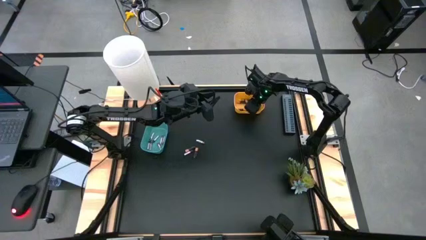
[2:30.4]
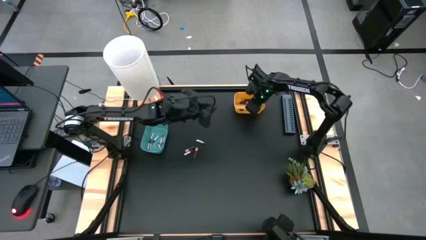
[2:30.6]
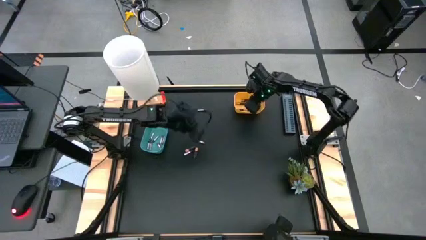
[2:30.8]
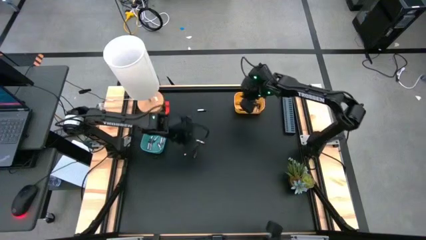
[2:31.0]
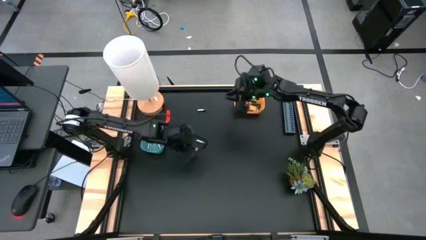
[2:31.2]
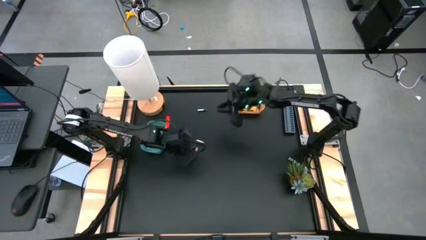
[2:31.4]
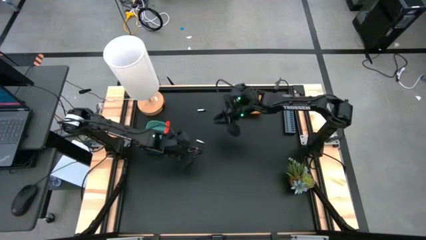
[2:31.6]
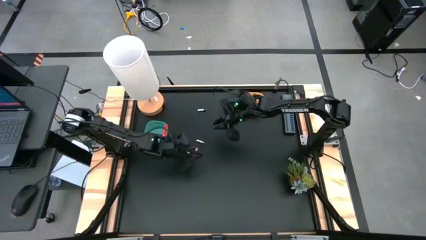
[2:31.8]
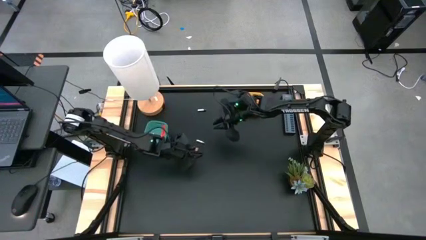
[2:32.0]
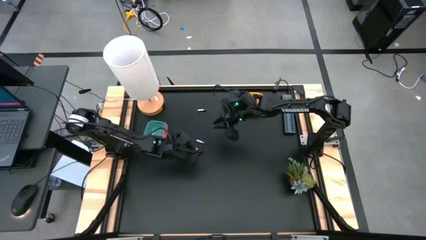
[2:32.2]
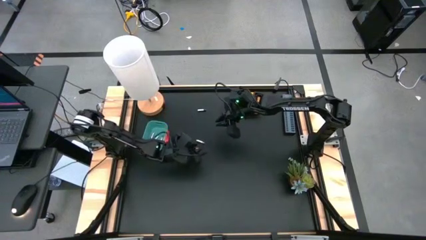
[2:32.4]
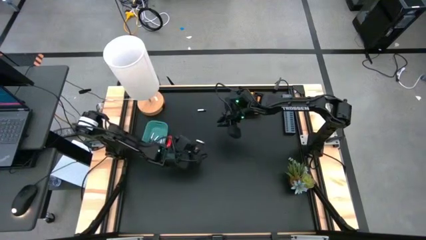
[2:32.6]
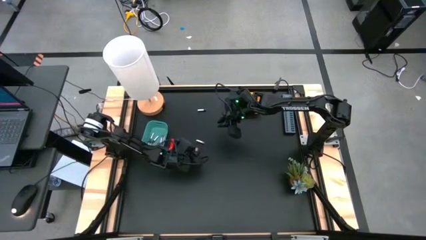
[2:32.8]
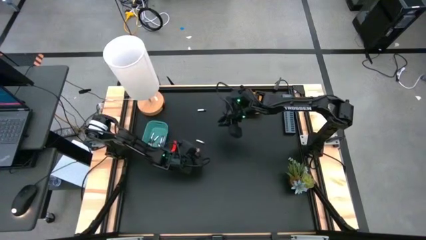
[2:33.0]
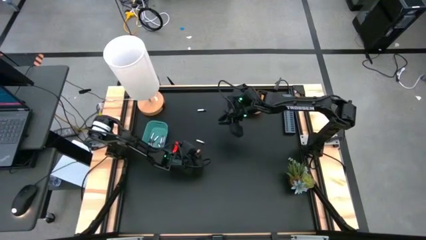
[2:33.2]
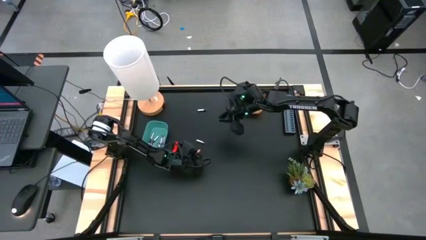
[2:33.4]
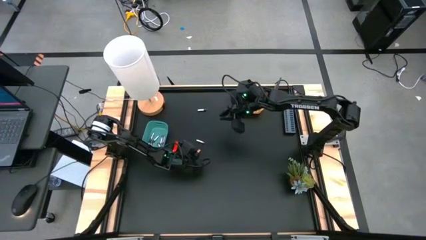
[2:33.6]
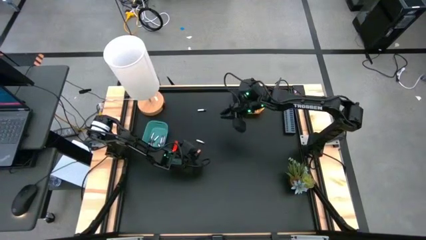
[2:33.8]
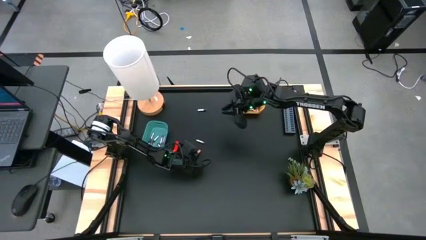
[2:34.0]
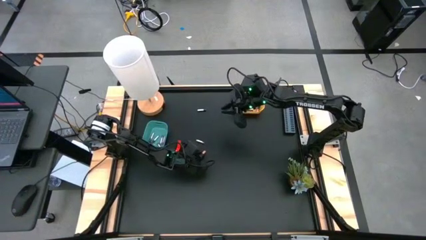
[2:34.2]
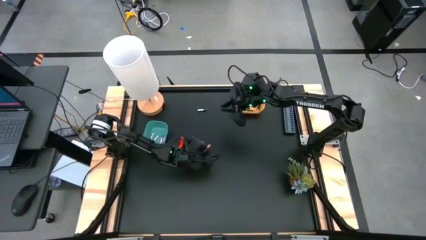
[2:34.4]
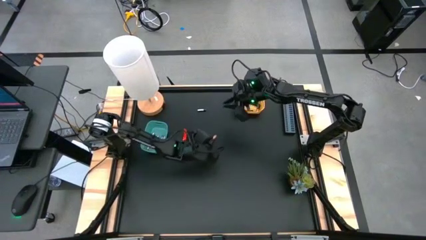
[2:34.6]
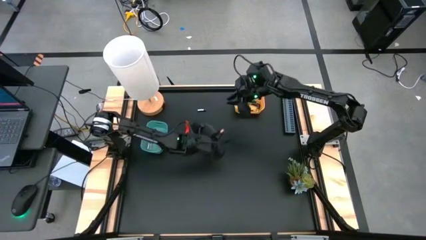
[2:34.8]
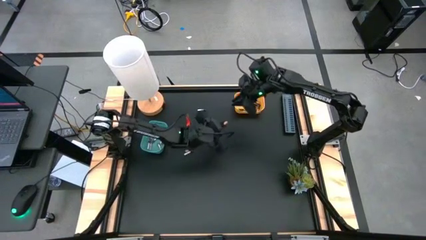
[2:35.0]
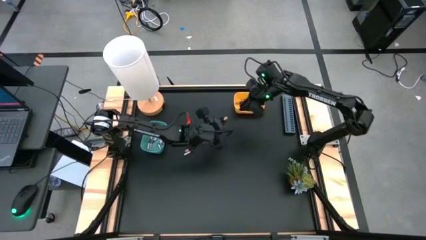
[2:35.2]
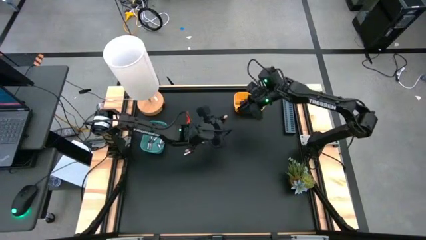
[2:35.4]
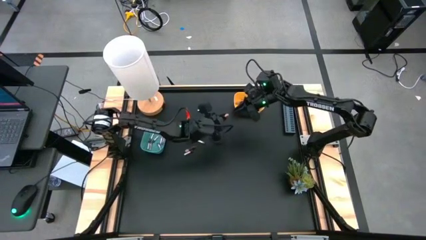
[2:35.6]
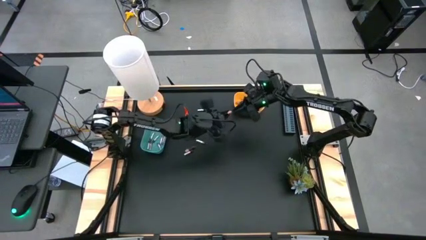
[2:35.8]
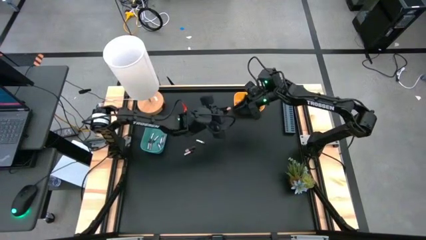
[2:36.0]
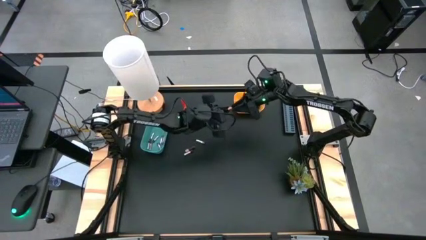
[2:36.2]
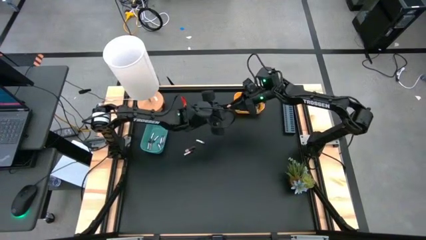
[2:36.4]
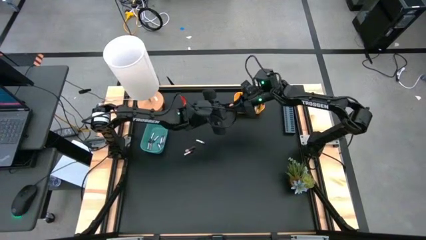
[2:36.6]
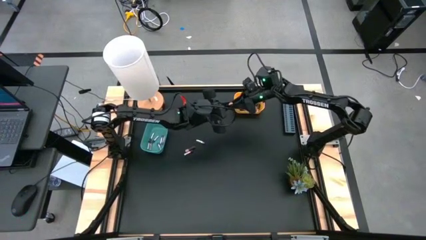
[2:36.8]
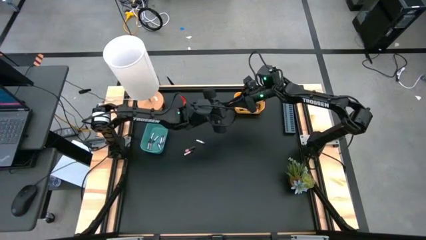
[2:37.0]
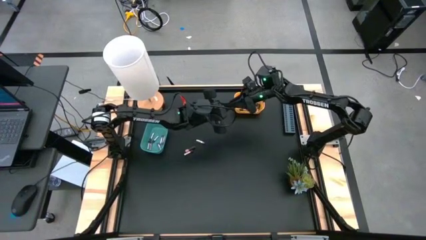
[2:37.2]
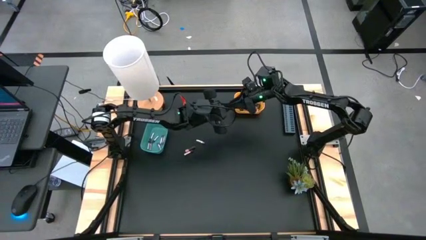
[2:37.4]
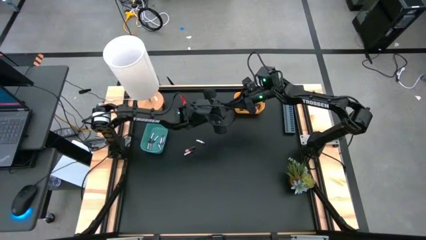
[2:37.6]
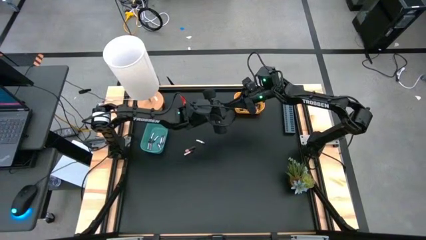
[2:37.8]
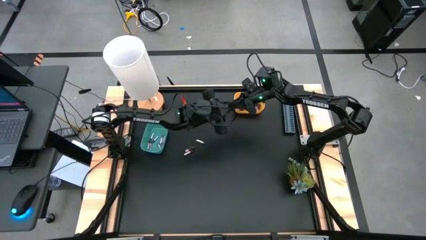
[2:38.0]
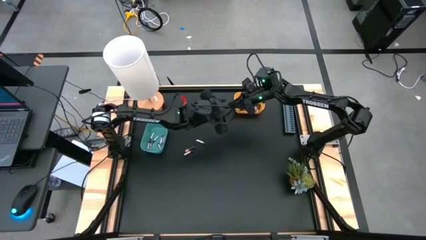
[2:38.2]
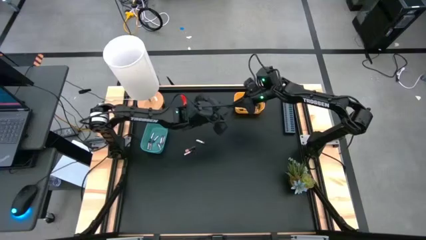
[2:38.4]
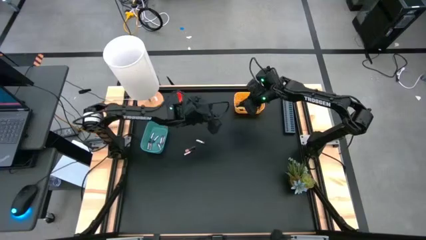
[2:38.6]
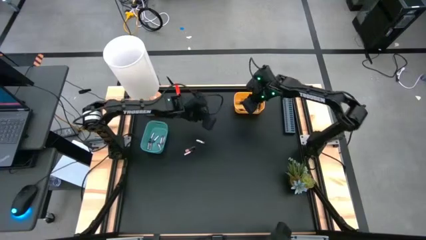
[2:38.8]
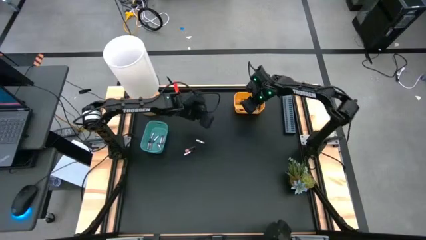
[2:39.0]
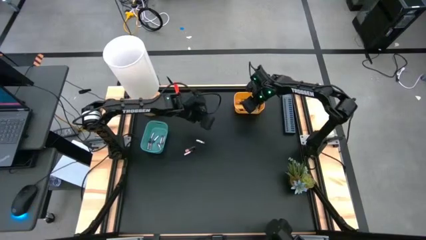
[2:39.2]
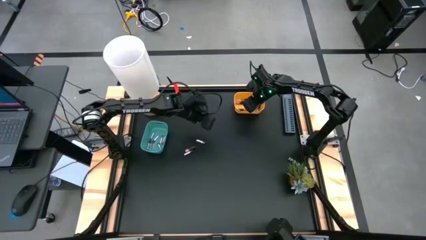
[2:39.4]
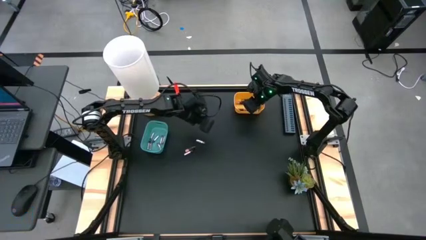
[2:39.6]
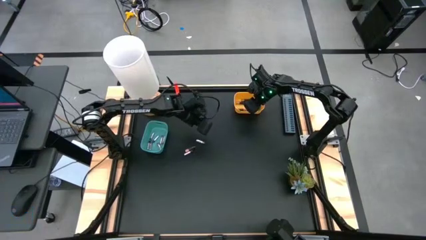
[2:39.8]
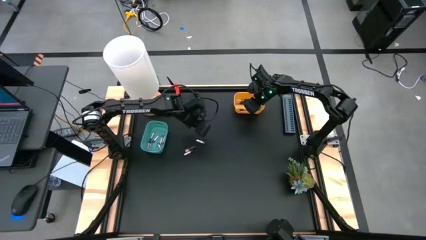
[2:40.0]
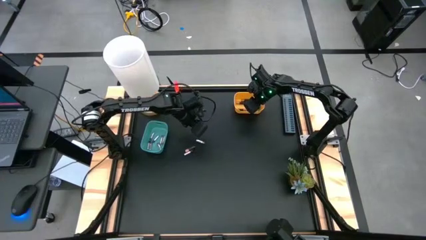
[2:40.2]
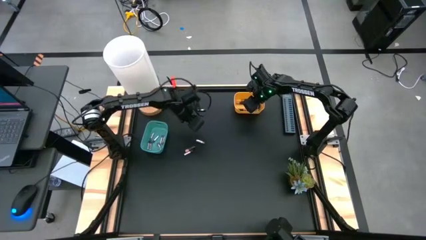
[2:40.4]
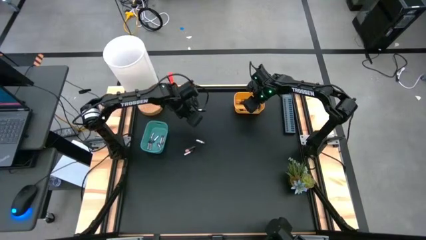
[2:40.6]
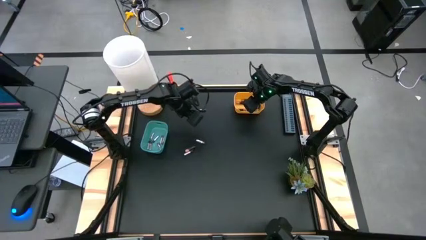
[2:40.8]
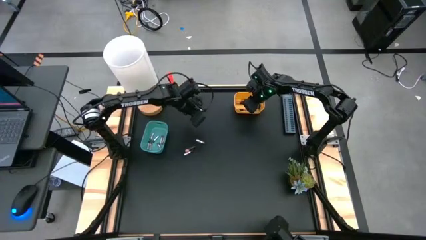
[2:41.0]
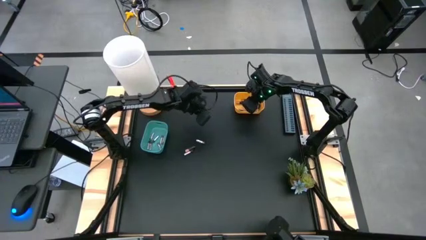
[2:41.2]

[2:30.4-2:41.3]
Task: Sort batteries
Put the black battery into the yellow bin

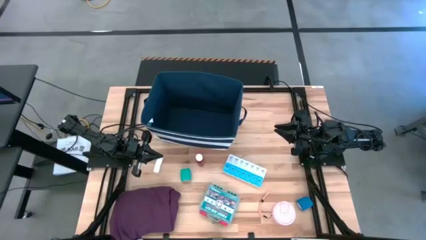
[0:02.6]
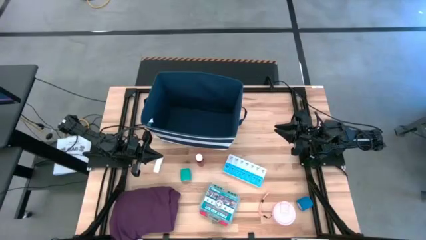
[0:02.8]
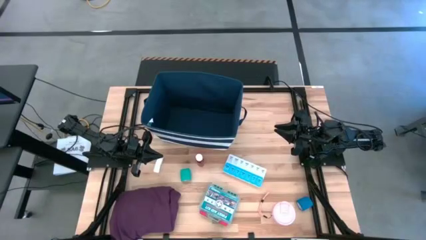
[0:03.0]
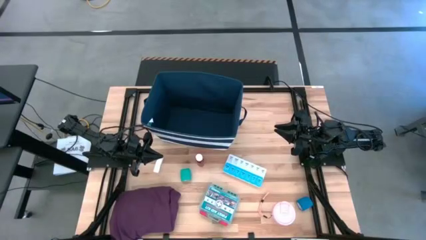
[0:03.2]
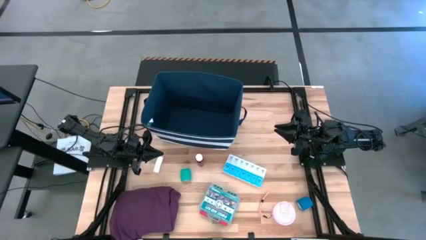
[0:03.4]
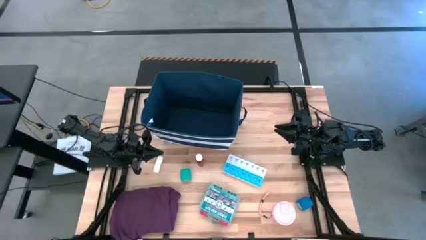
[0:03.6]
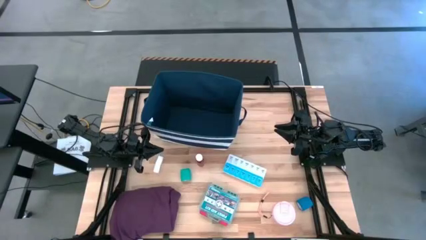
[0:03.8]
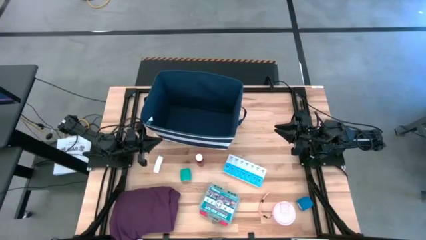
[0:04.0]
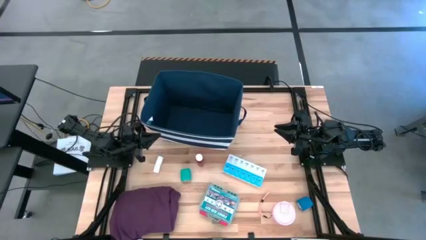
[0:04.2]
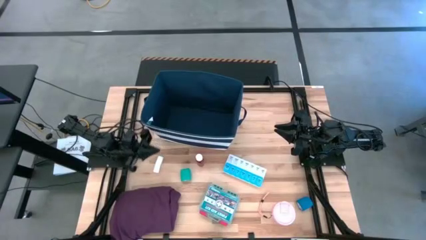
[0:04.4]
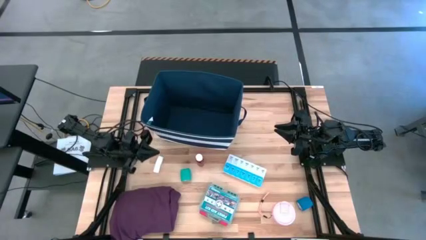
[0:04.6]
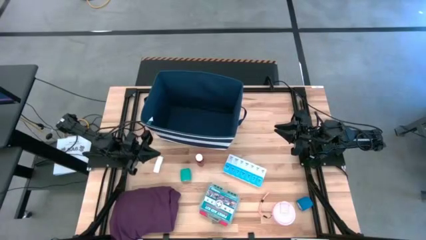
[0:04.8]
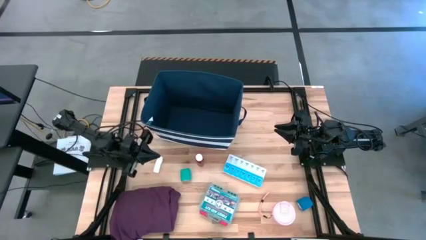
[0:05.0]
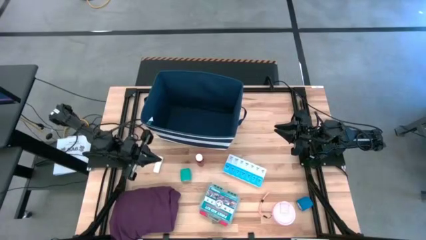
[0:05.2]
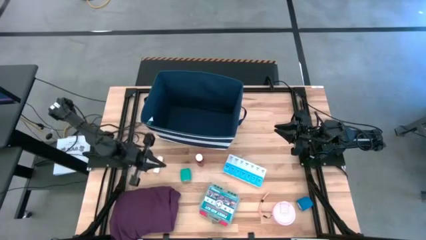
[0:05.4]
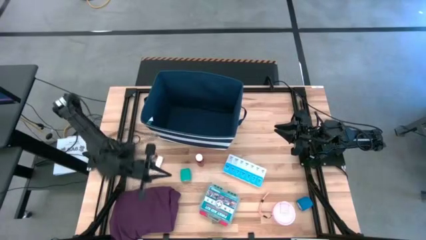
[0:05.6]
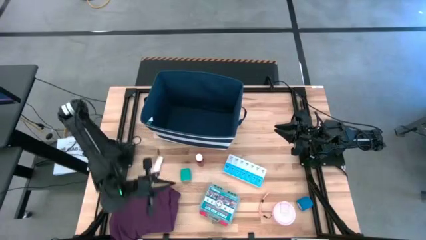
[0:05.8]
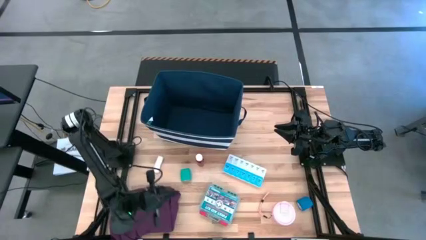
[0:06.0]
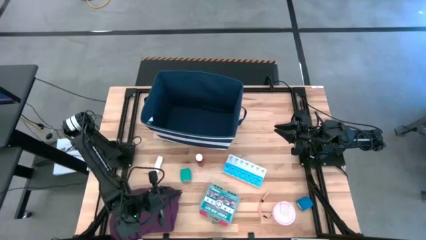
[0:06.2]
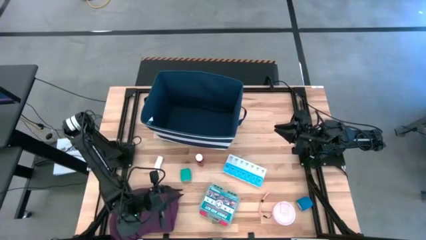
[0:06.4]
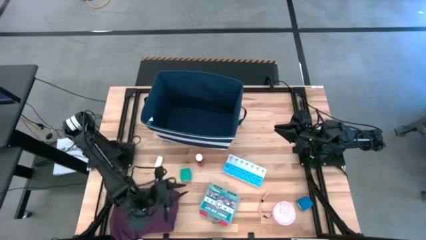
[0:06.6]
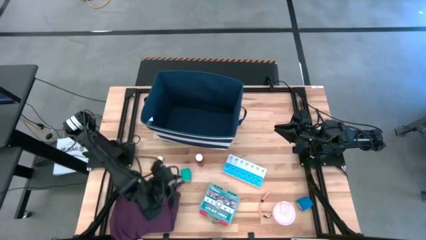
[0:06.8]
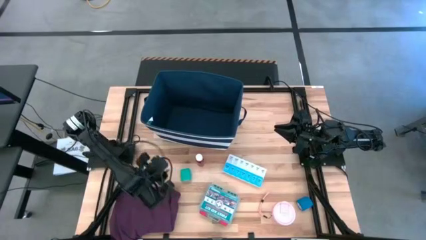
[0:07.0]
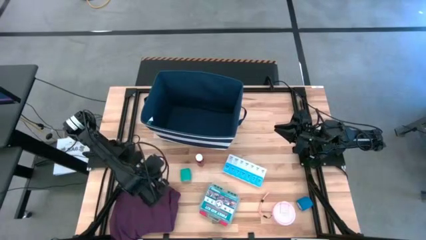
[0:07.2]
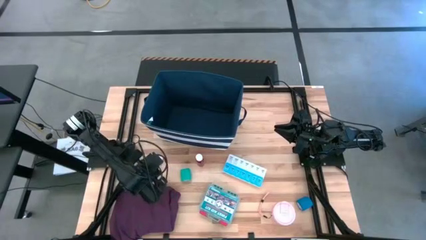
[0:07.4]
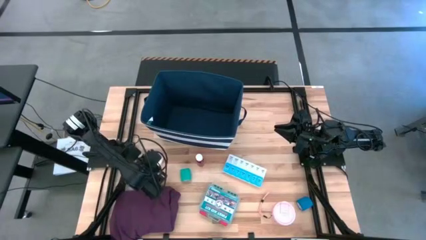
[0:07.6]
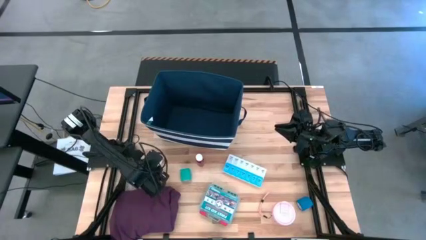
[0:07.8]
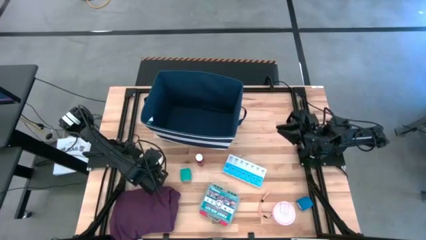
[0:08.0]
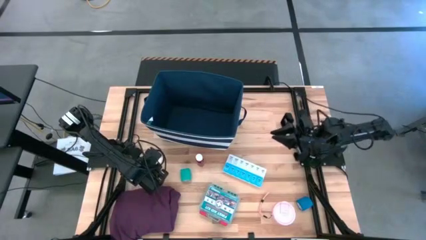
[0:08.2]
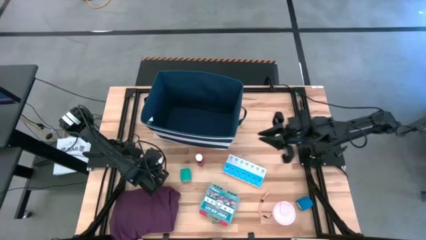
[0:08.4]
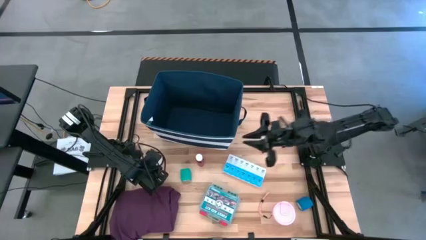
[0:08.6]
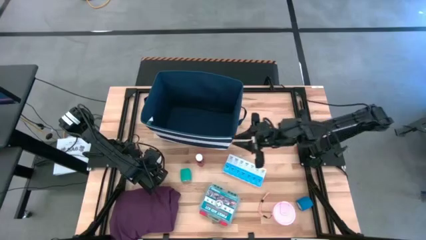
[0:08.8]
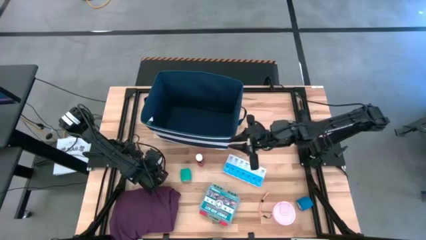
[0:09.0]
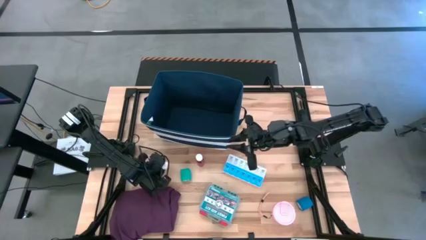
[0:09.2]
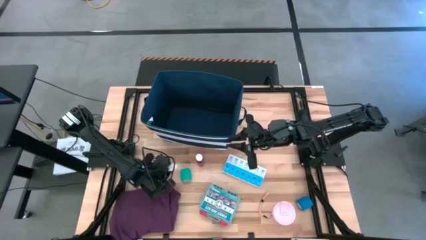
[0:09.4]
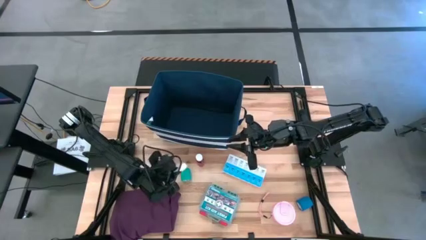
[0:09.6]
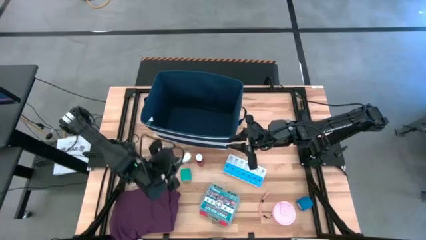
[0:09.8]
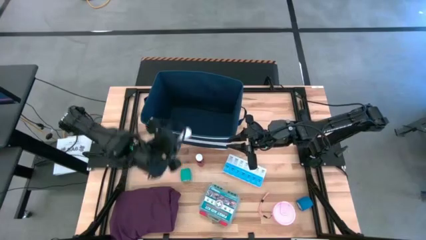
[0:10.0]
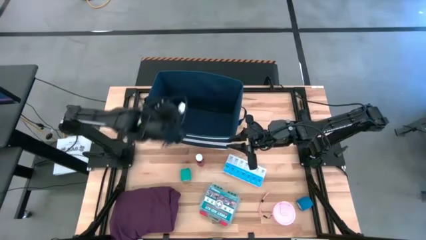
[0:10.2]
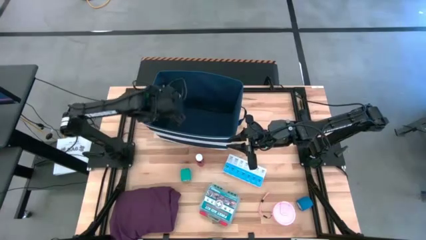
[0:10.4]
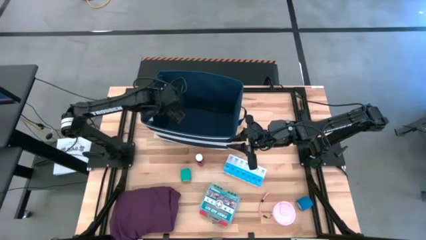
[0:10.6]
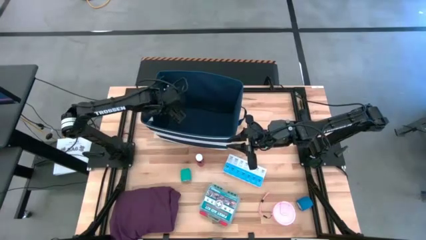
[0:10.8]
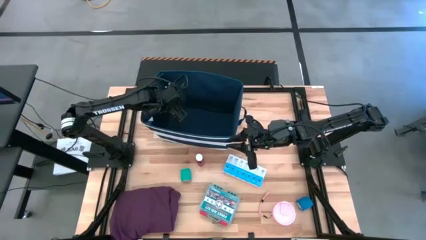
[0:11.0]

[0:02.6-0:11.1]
Task: Pick & place medical supplies in basket/bin
Put the white gauze into the blue bin
